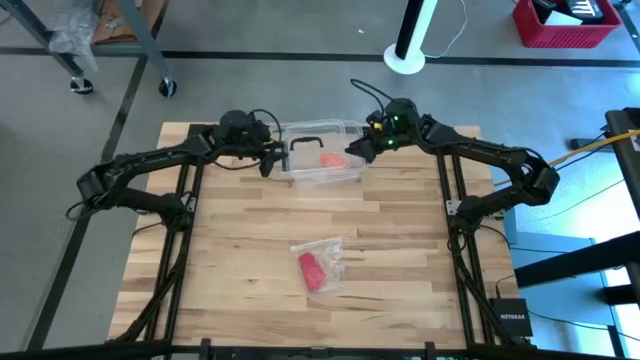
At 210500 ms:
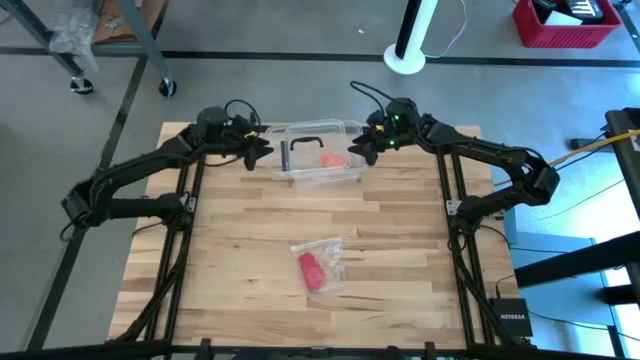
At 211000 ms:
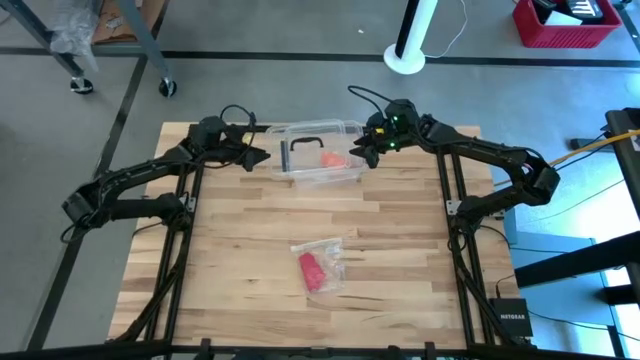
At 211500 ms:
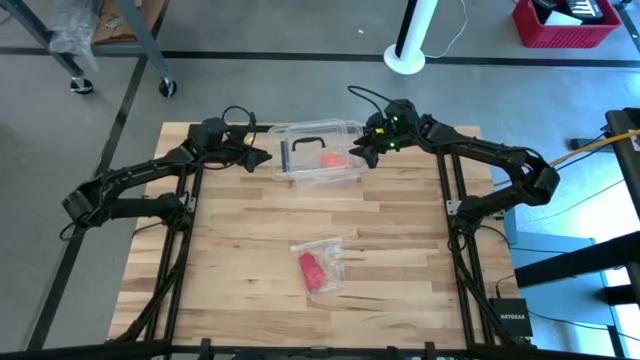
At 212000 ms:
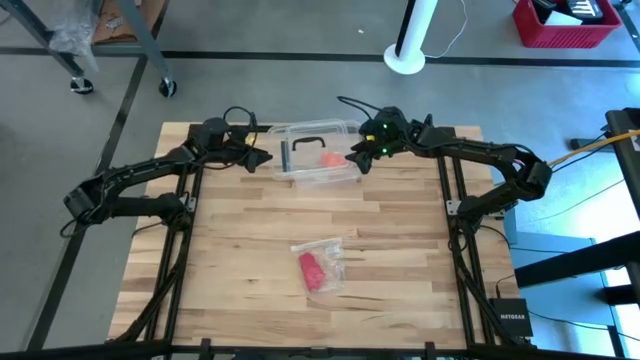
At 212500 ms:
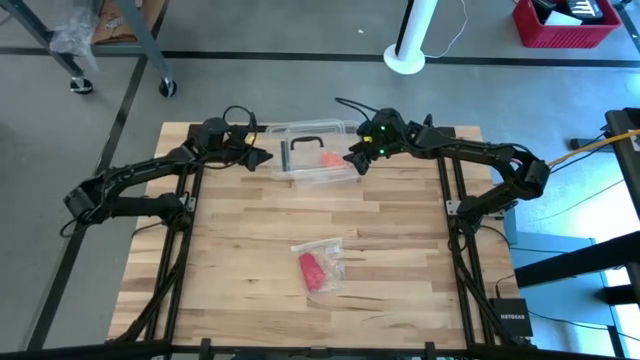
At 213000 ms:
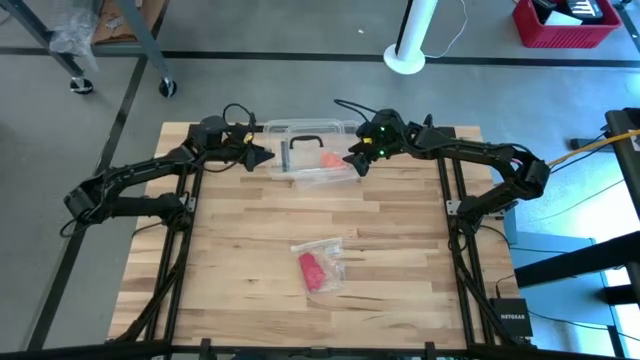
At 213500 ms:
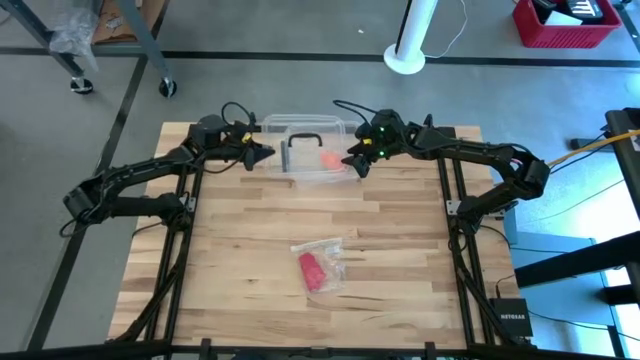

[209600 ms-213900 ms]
Task: Roll bandage
Open the lid of the transparent container

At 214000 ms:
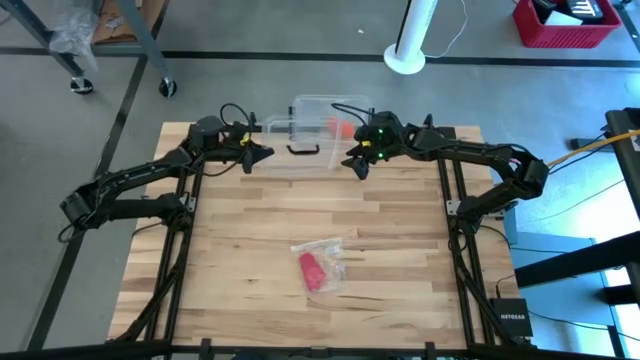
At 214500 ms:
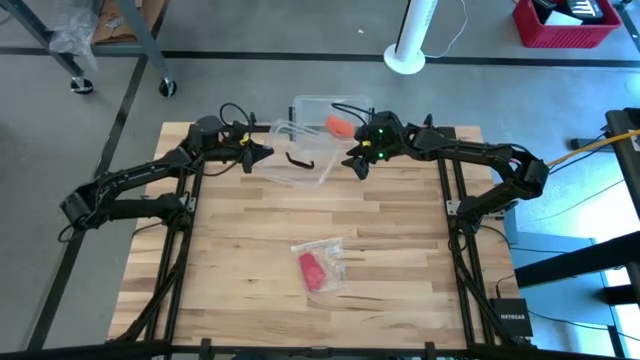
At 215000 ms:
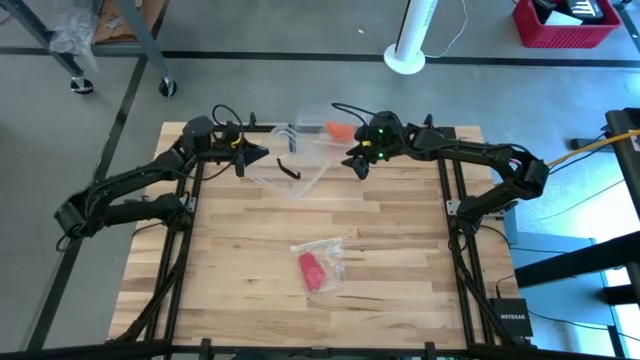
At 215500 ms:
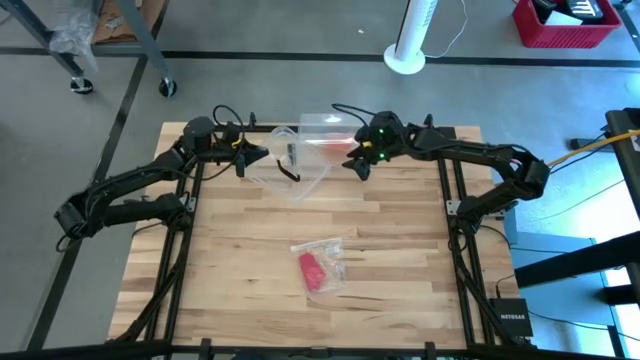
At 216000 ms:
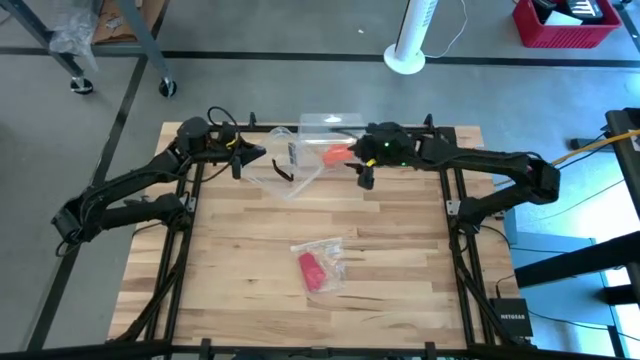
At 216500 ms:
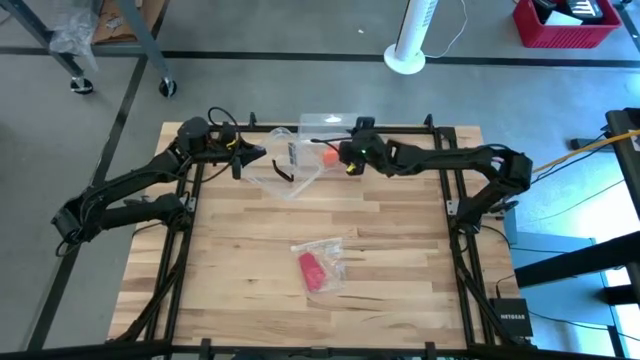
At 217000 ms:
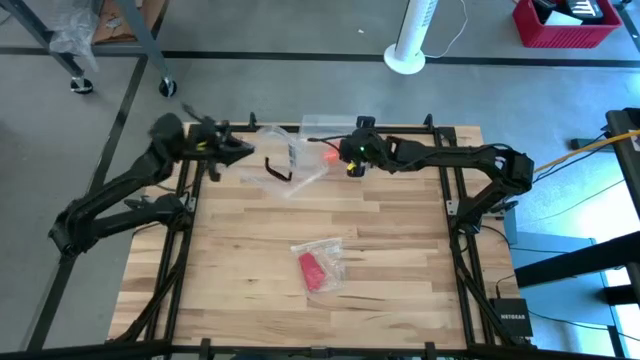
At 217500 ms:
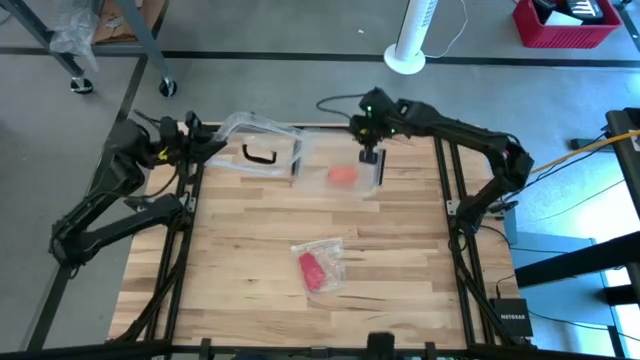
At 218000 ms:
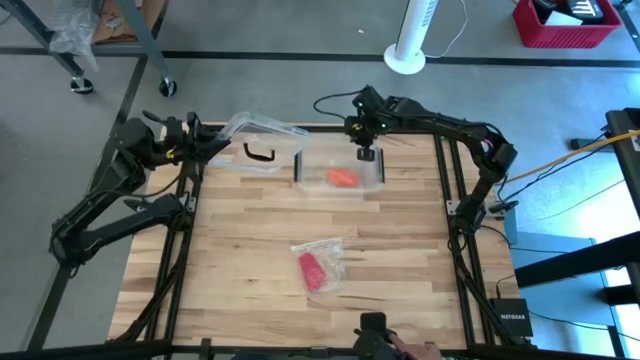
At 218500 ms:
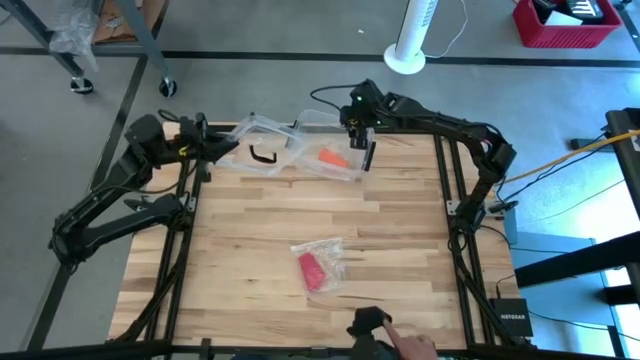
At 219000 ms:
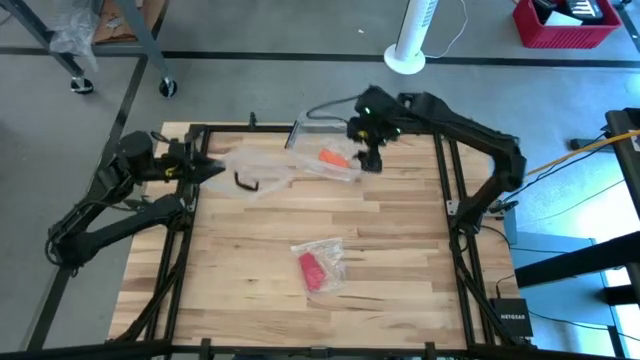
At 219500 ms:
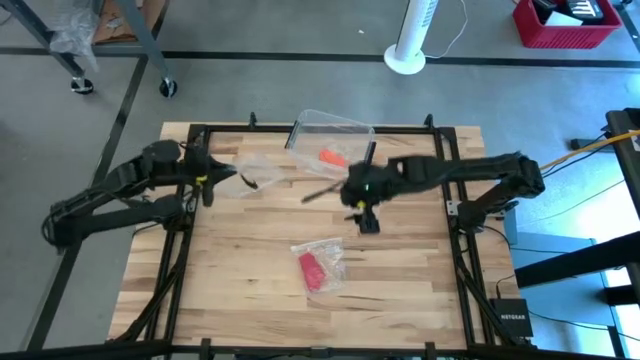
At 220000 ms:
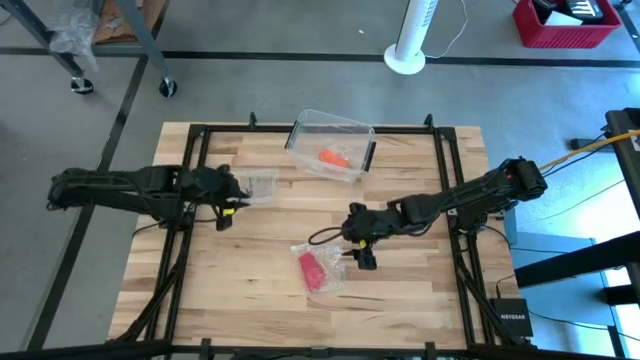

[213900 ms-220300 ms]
Adjust the transparent container

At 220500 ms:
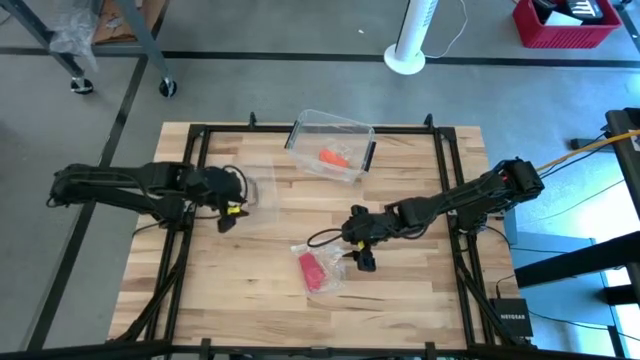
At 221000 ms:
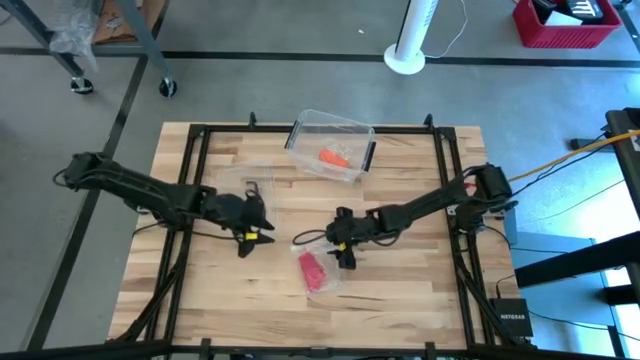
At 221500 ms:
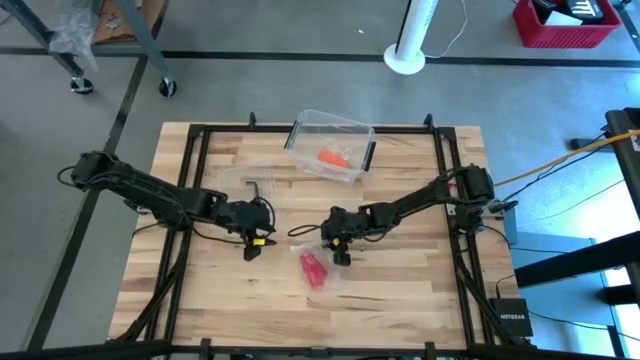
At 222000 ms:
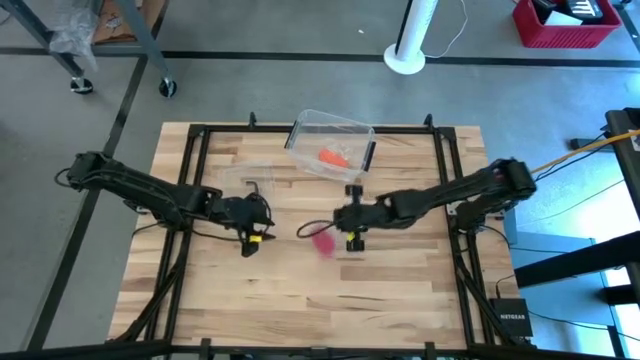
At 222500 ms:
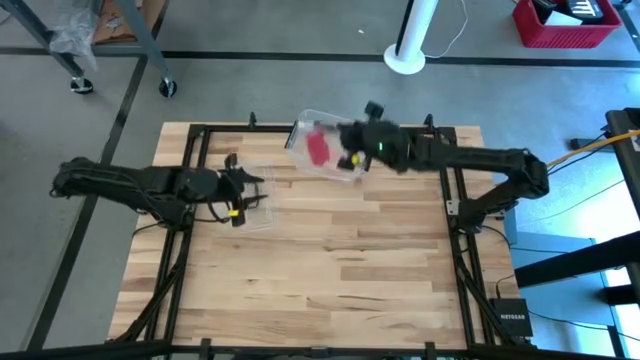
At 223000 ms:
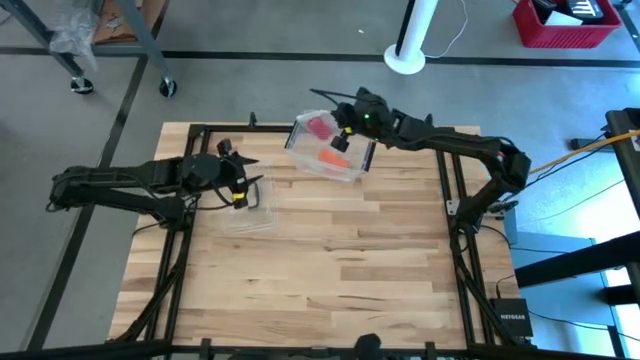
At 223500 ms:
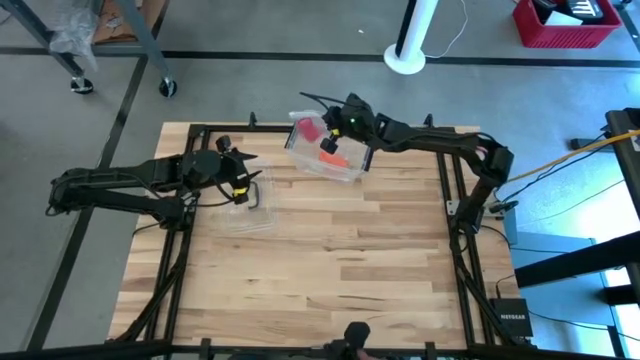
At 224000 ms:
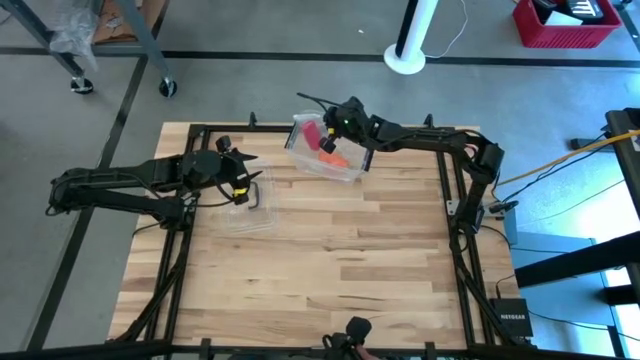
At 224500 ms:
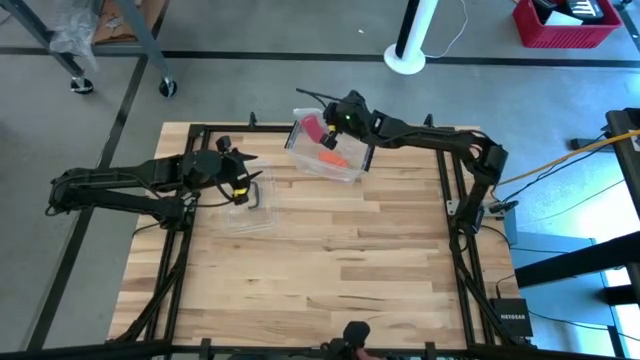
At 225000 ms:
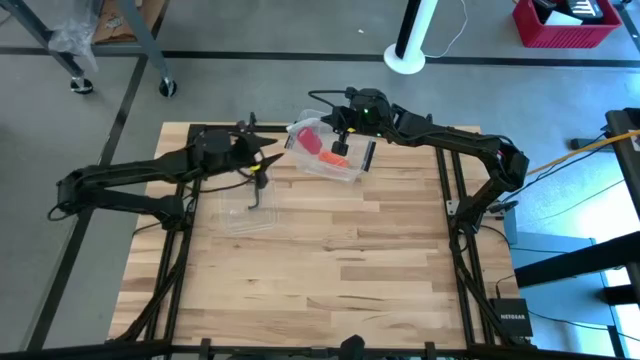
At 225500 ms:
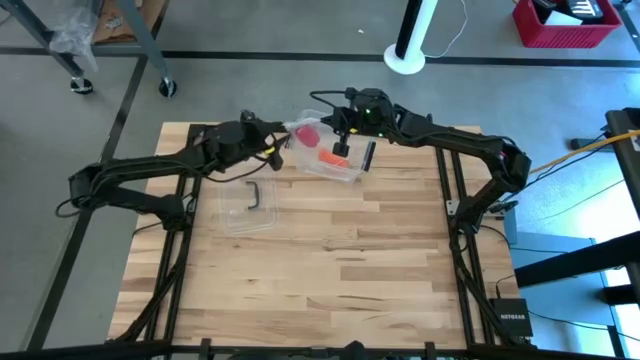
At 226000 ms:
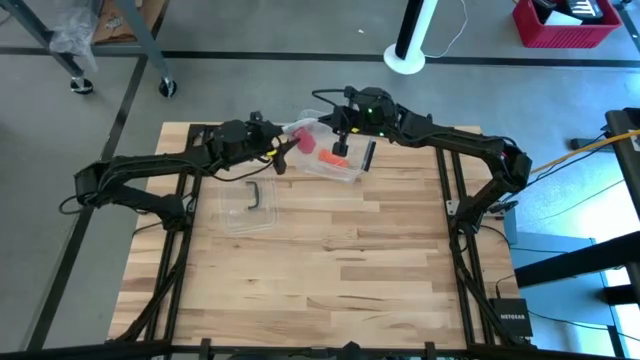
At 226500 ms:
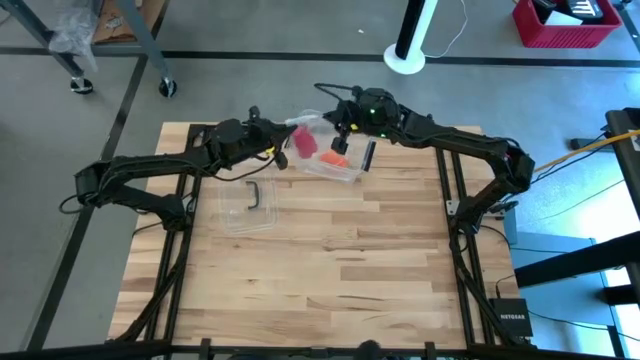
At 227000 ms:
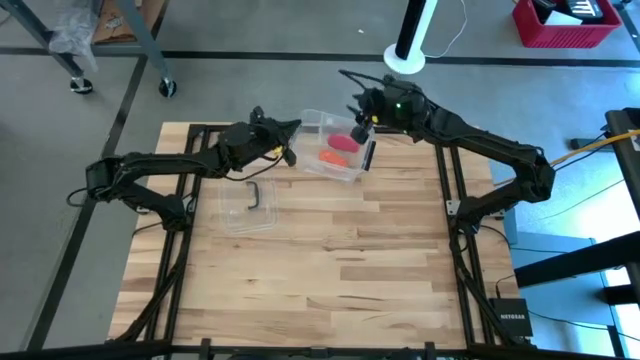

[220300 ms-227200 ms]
Put the transparent zip bag into the transparent container

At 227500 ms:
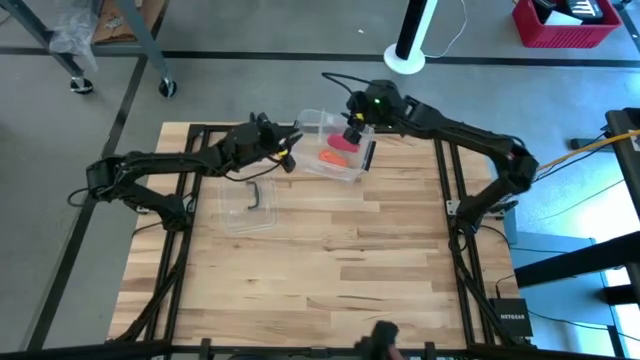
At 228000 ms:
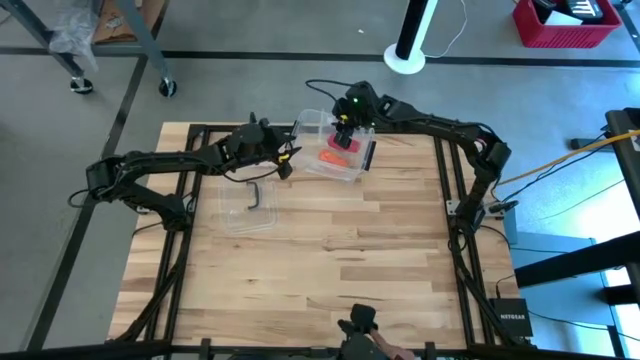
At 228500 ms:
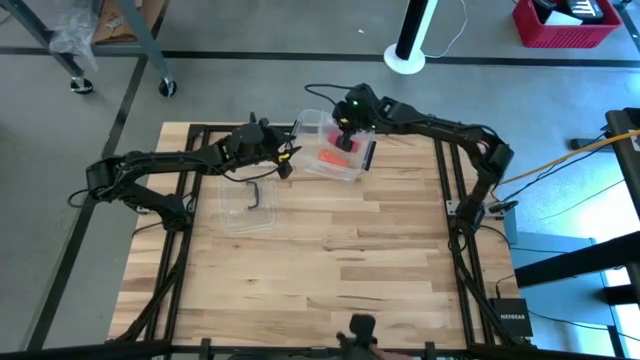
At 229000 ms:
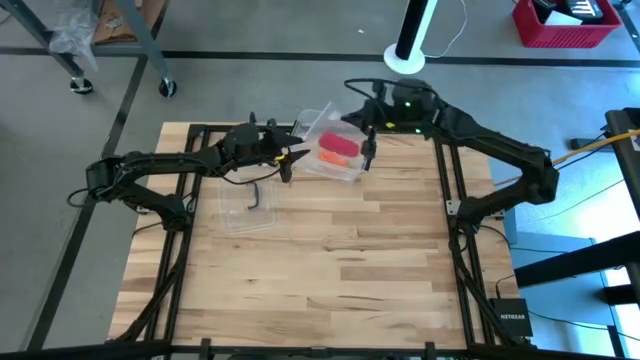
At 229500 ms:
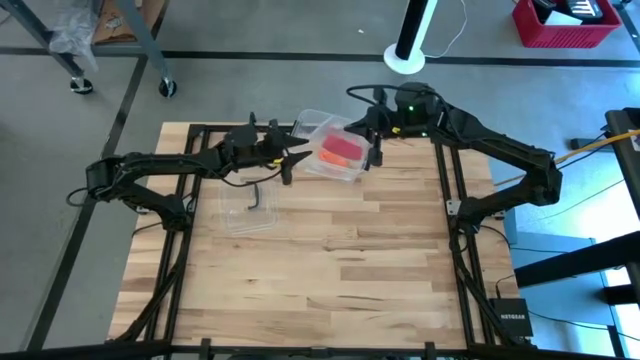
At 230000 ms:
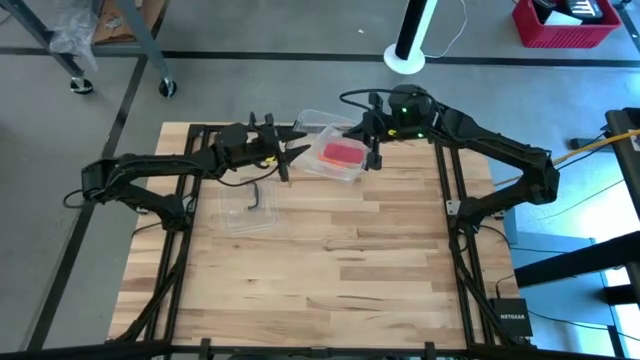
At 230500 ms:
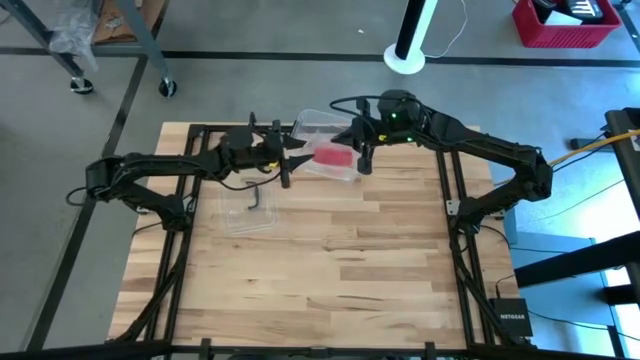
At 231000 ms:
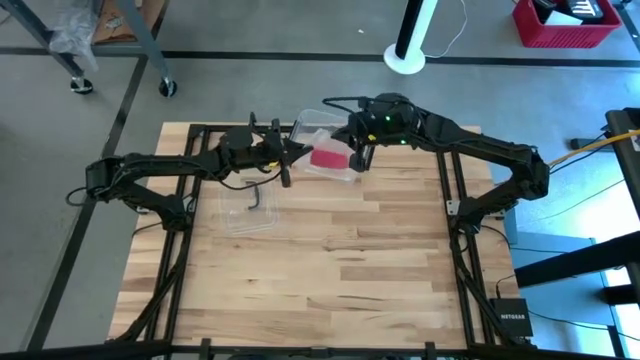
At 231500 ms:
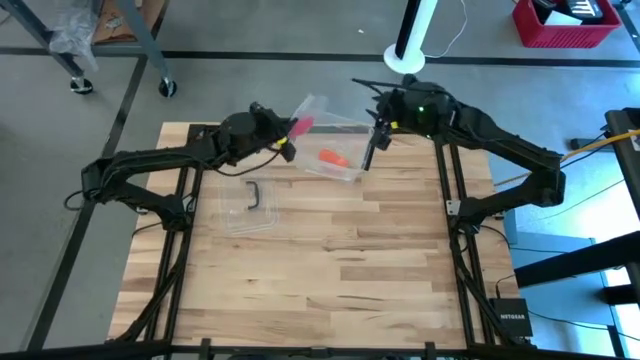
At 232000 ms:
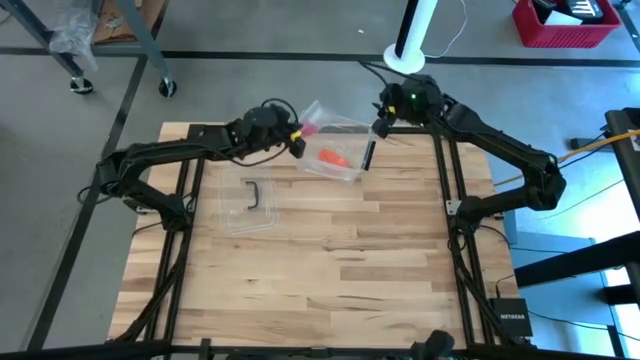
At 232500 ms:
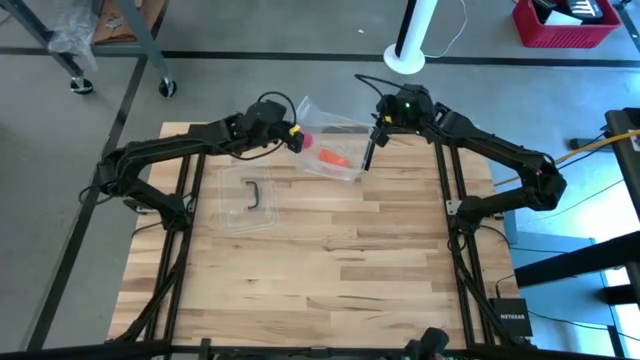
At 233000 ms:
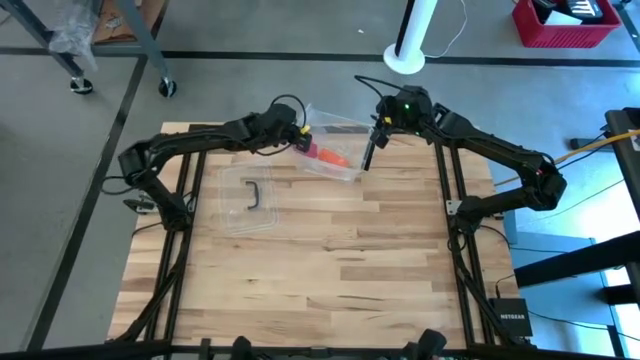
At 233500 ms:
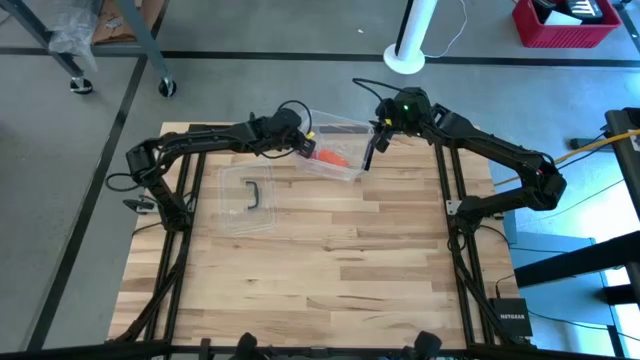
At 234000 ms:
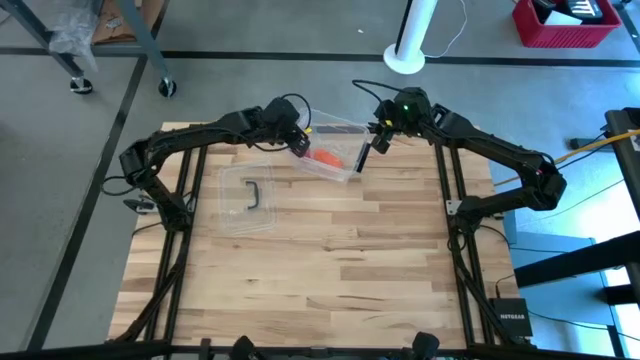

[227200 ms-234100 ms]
Put the transparent zip bag into the transparent container
